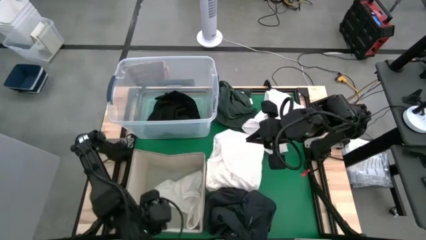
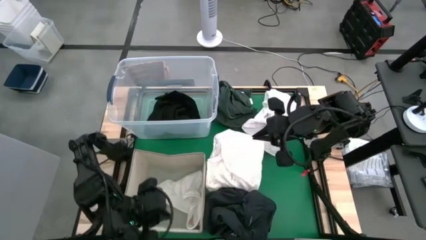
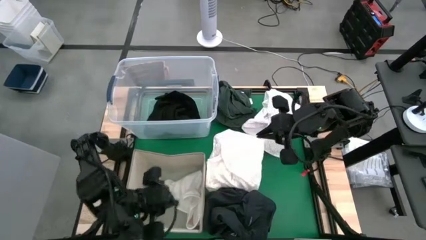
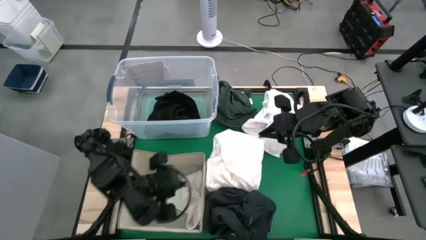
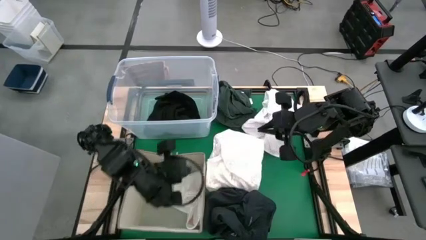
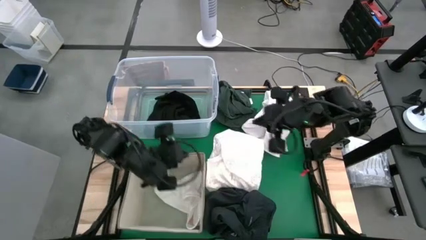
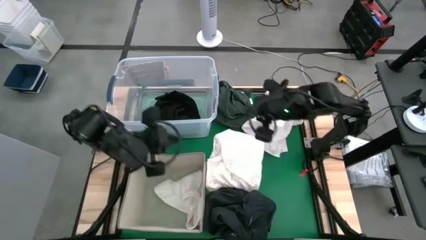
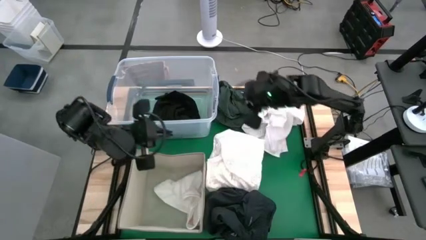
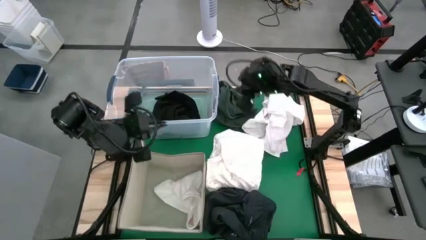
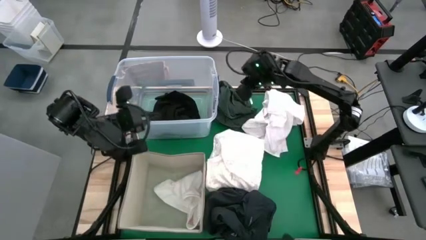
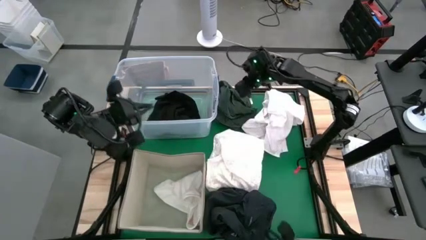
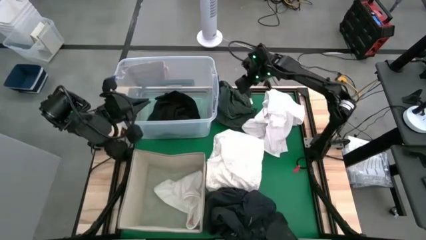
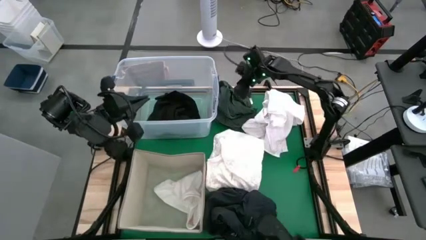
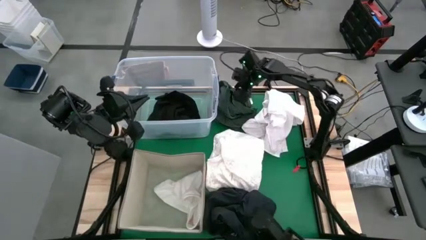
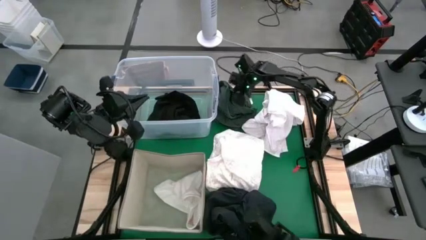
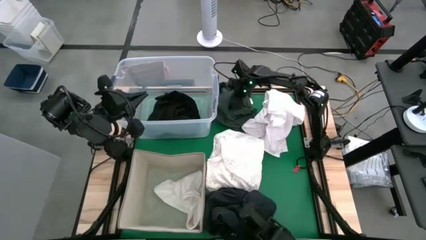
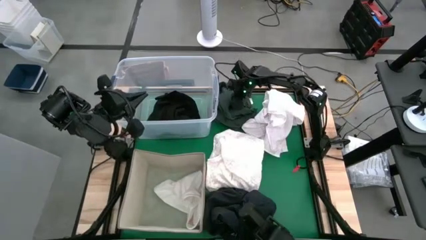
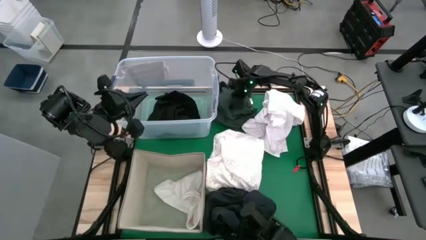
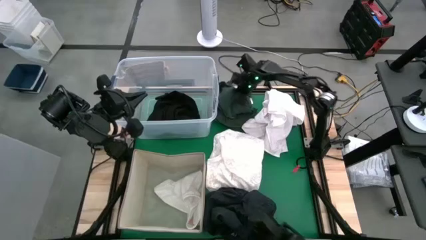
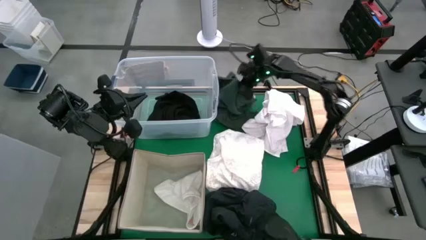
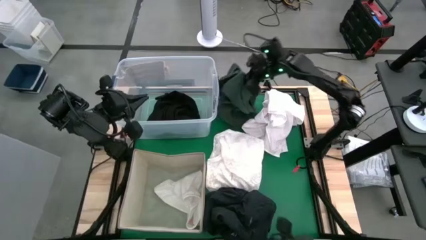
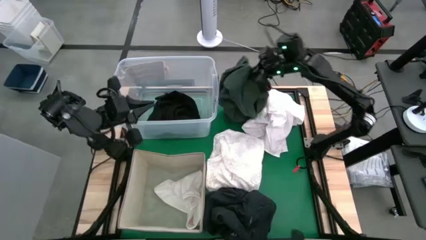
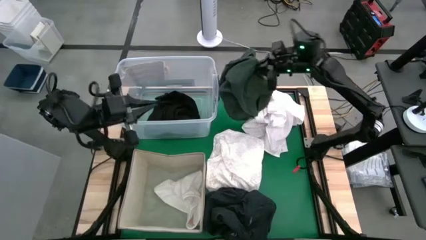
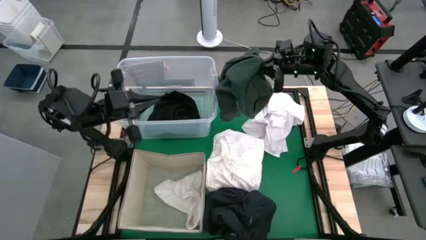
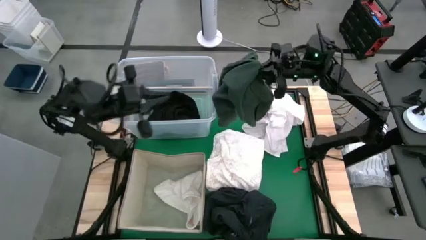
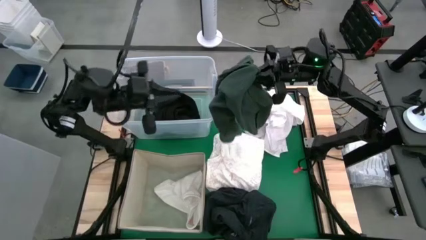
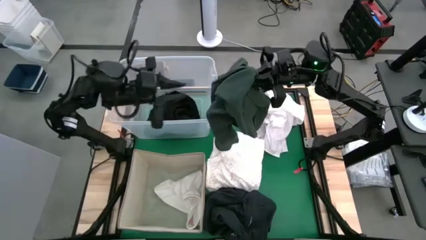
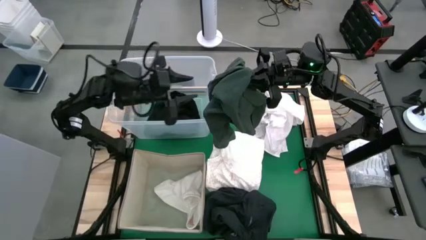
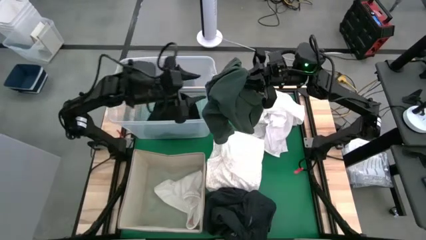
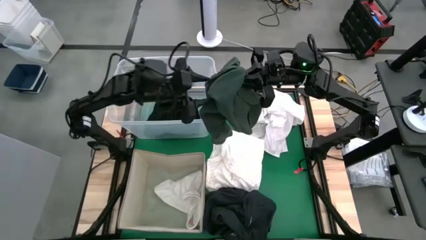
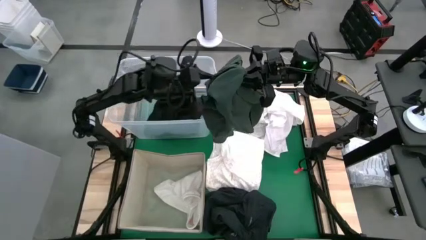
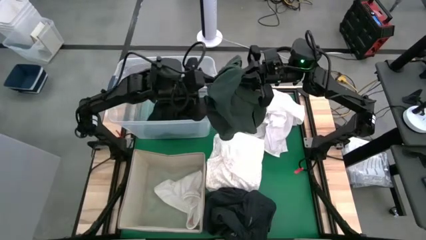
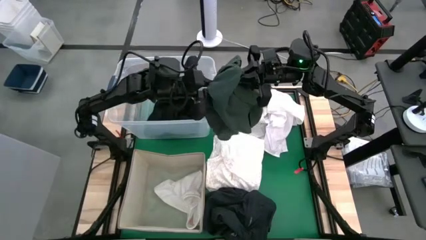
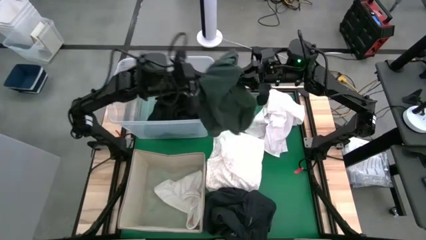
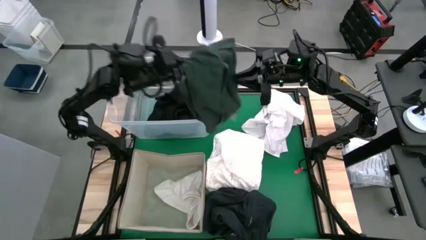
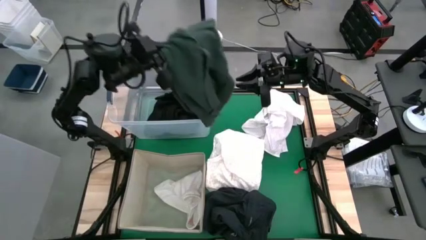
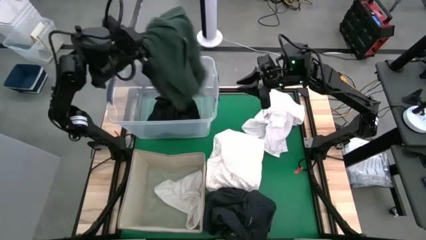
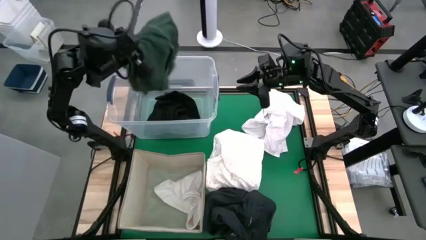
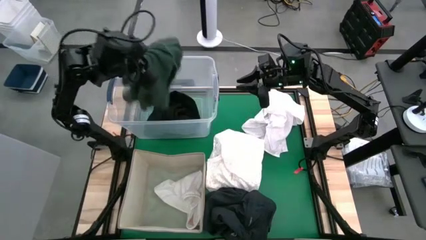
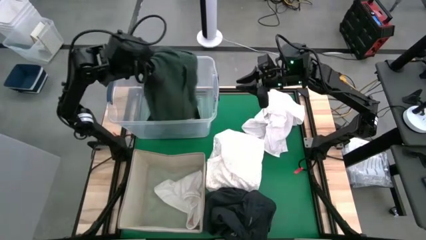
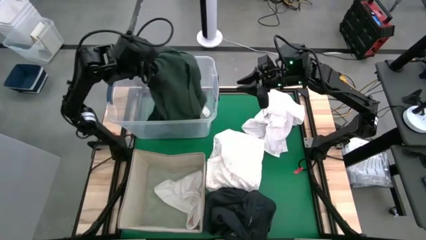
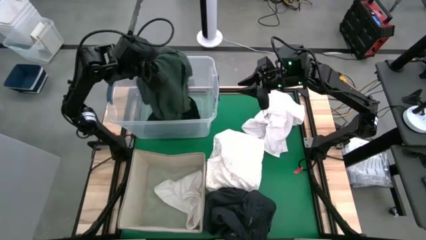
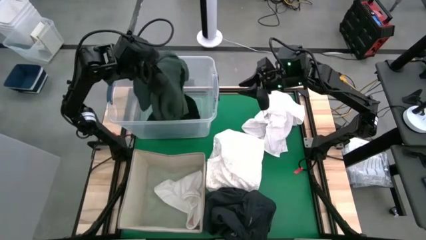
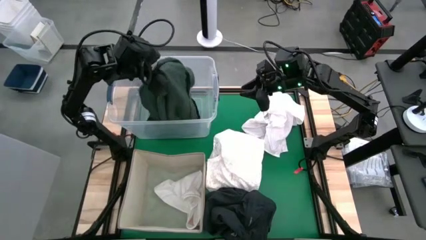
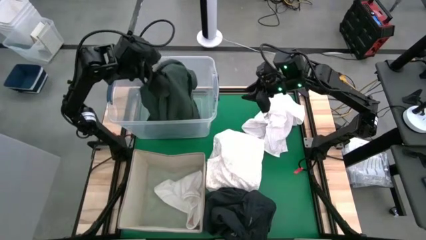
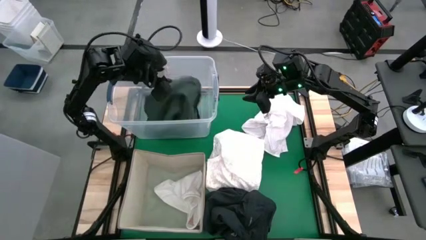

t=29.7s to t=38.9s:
Task: Sort clothes
Put the green polo shirt into the transparent bin

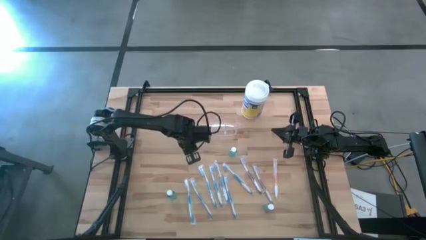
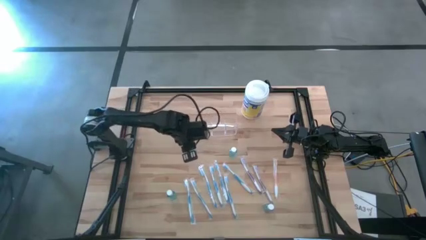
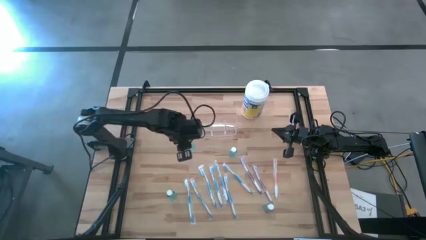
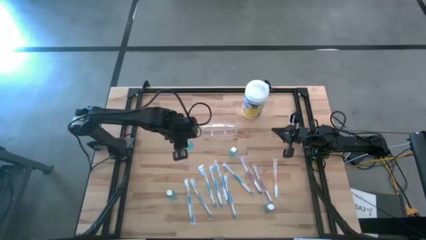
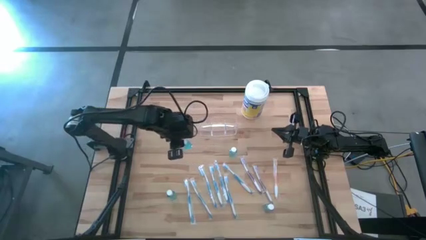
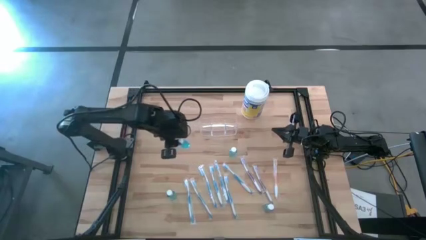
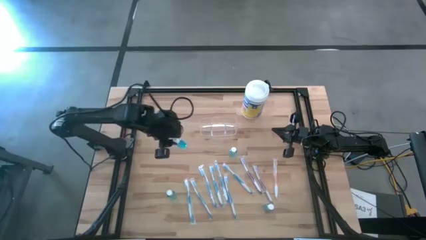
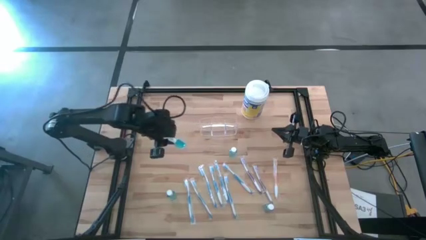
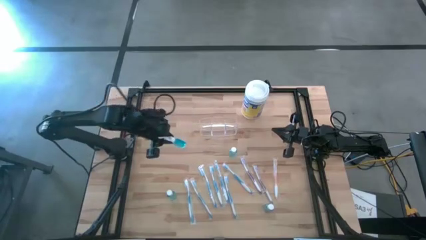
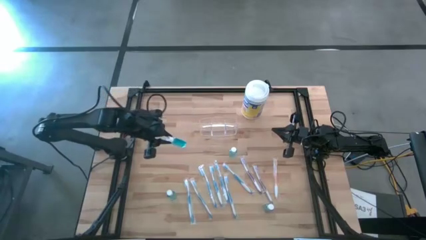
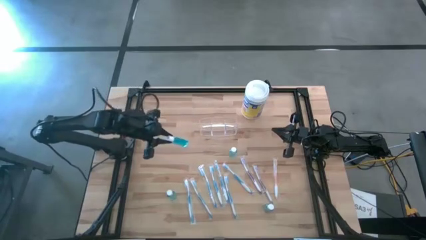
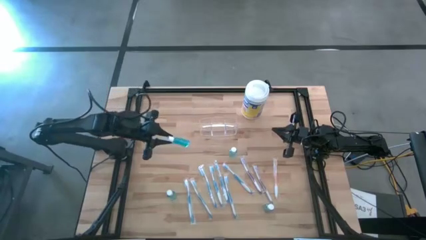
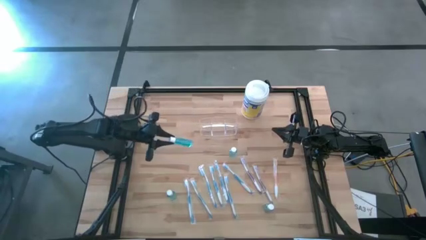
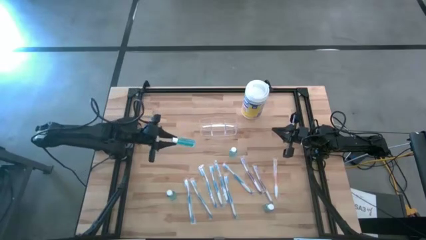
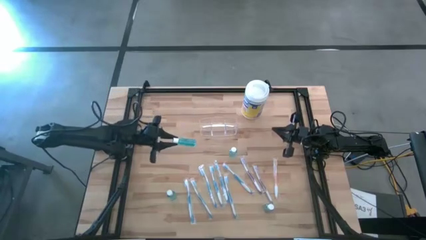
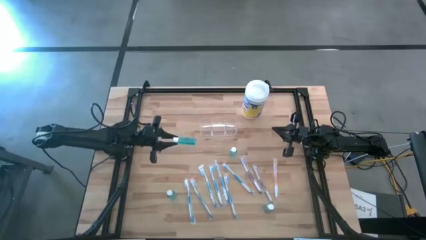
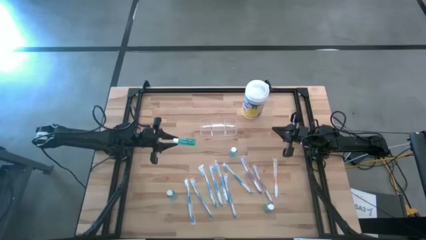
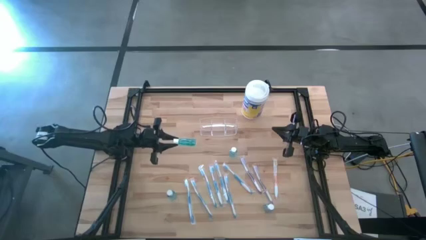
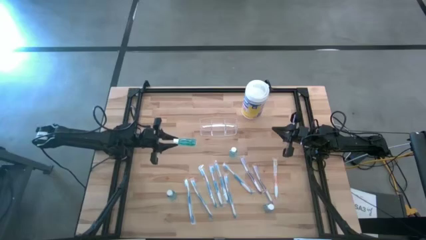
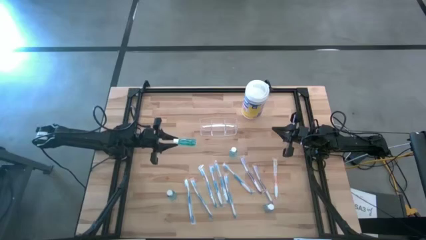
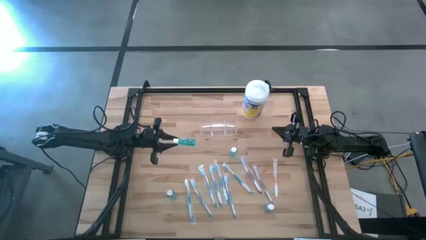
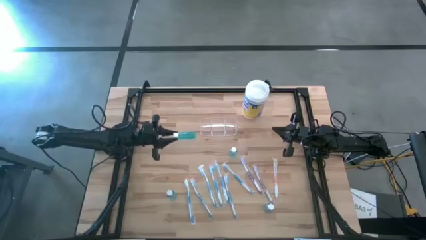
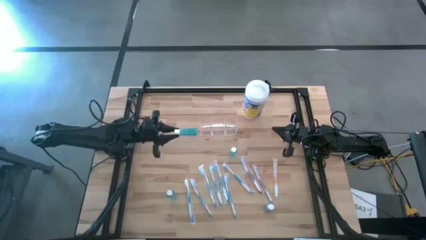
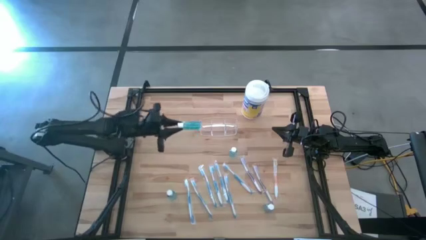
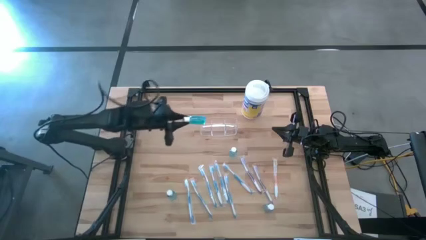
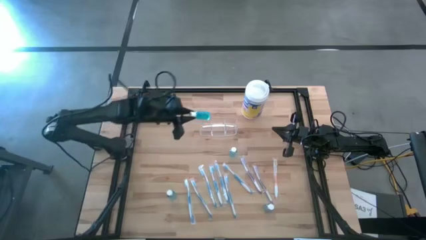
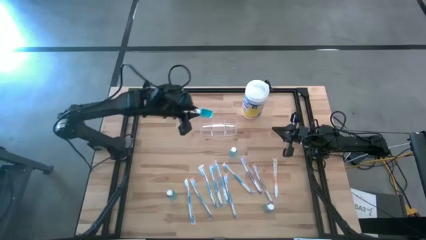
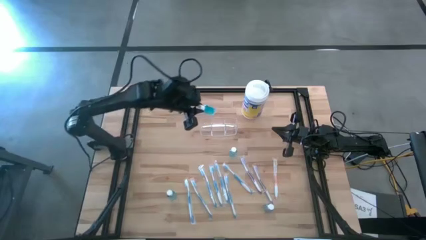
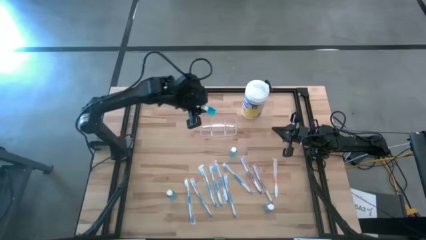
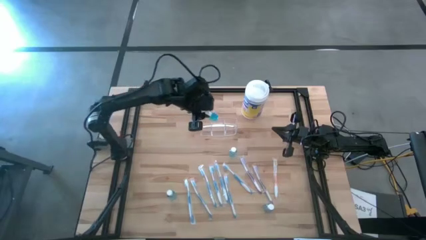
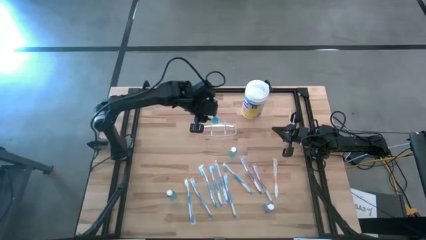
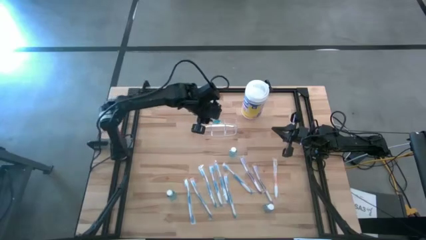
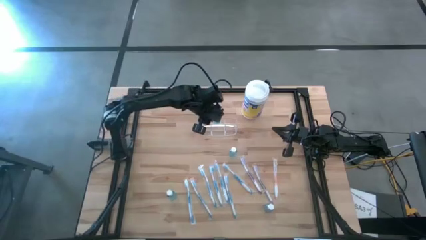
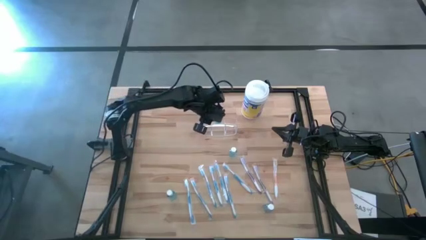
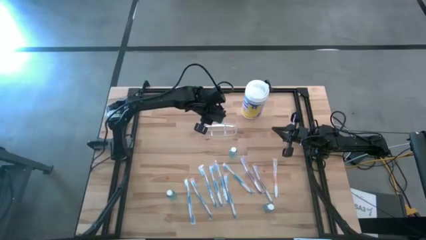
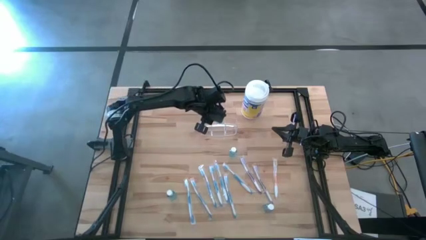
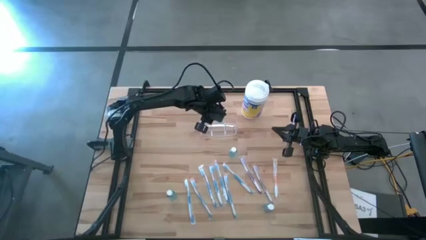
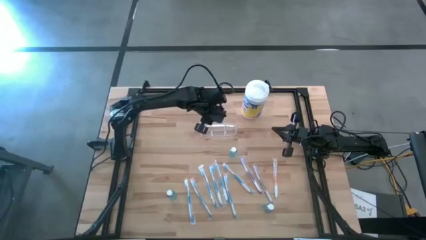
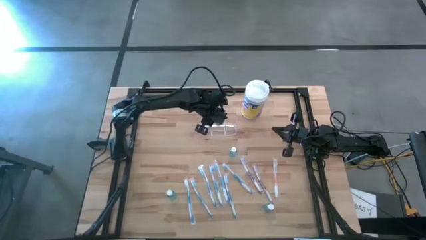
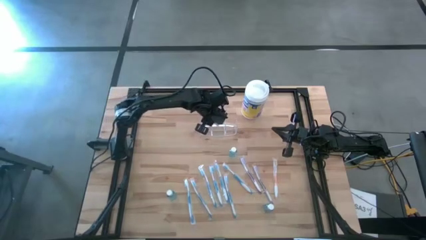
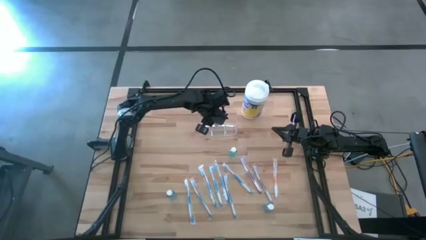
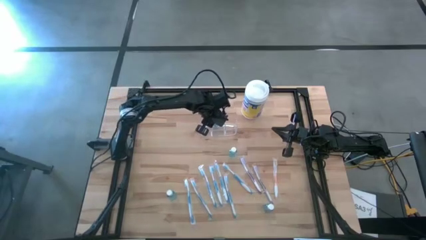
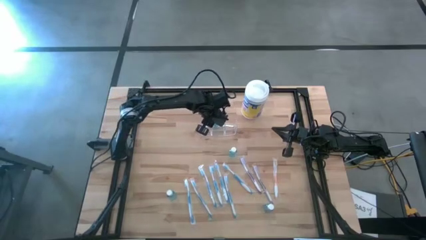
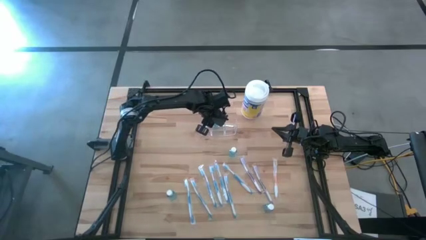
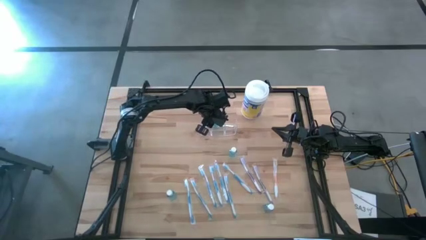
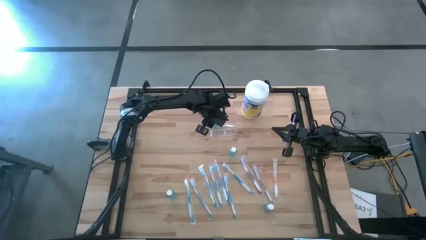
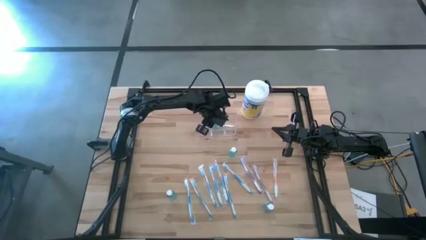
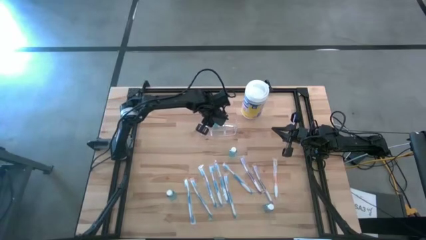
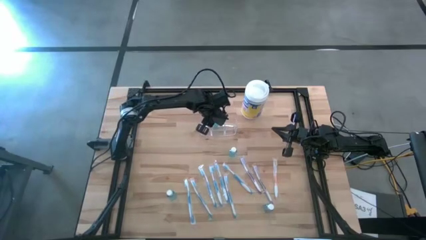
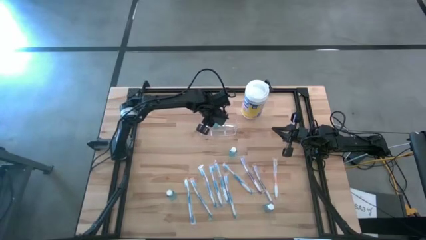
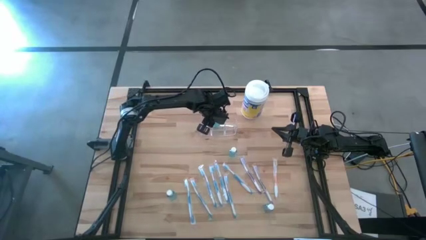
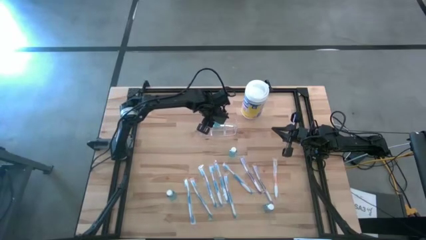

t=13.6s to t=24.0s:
Task: Pick & Place toothbrushing station
Put the blue mouthwash bottle into the transparent organizer
